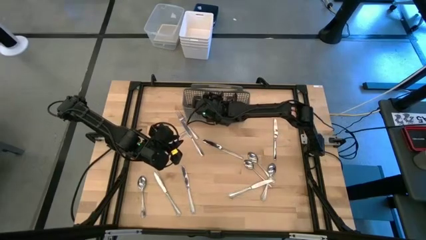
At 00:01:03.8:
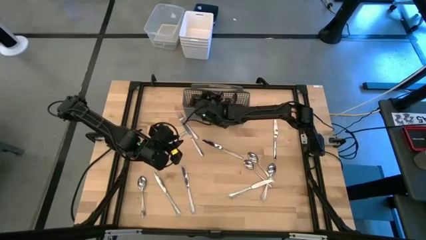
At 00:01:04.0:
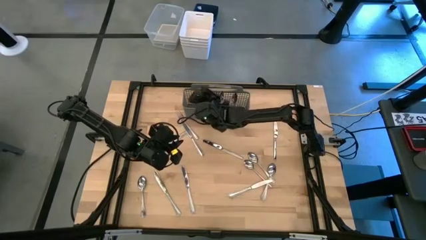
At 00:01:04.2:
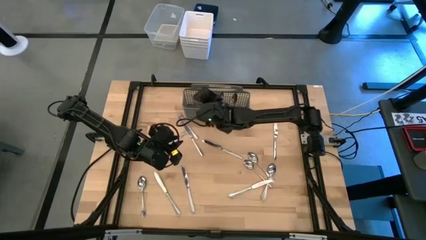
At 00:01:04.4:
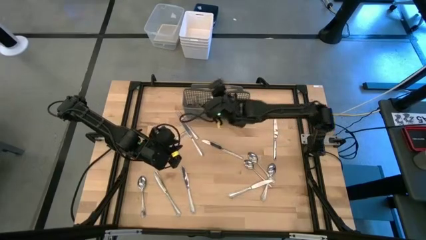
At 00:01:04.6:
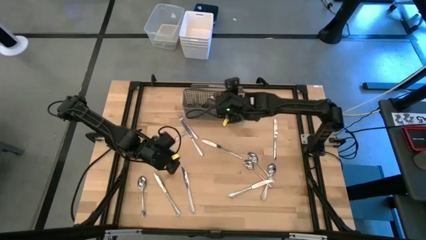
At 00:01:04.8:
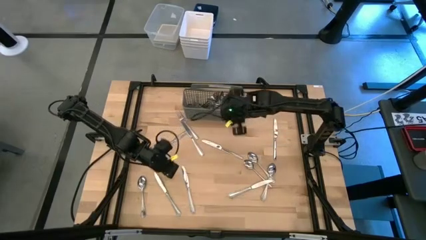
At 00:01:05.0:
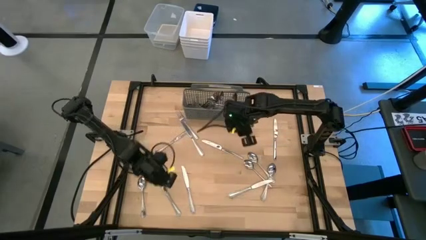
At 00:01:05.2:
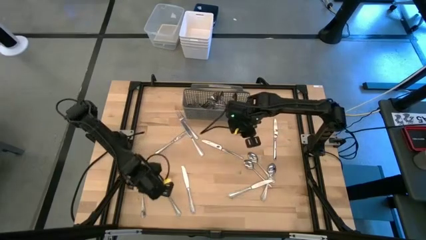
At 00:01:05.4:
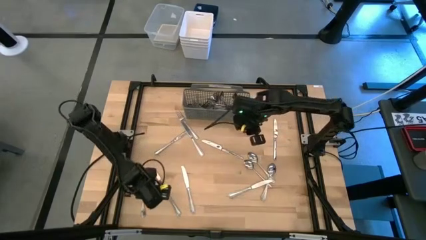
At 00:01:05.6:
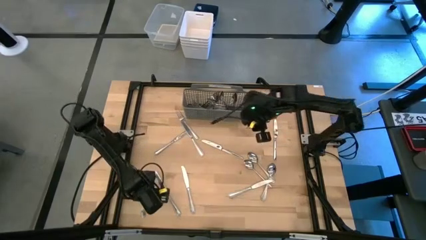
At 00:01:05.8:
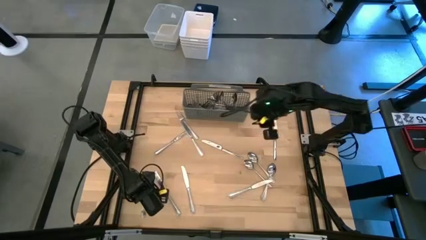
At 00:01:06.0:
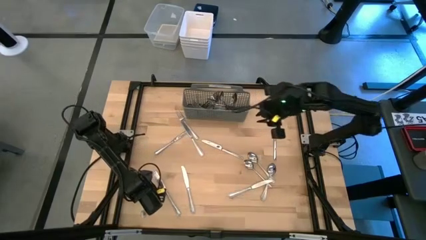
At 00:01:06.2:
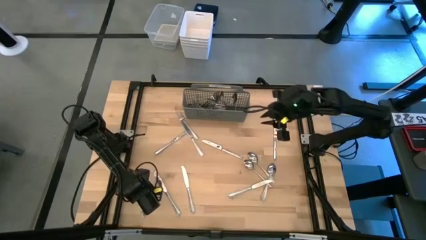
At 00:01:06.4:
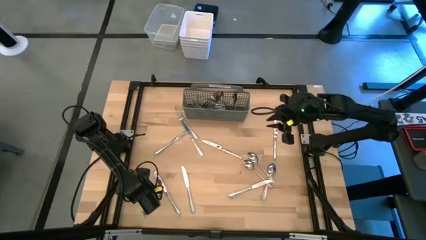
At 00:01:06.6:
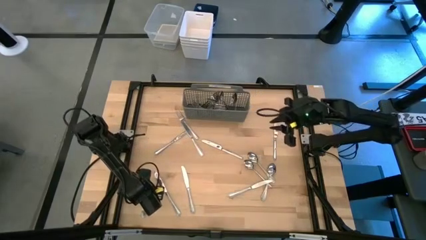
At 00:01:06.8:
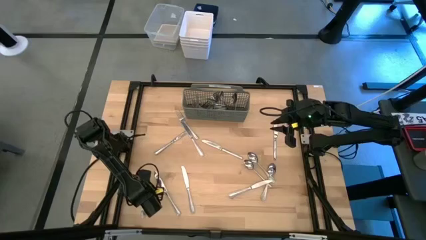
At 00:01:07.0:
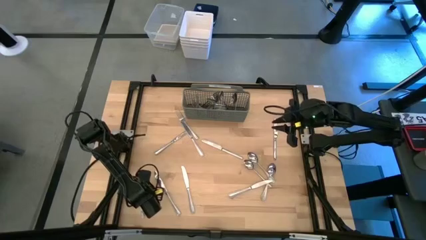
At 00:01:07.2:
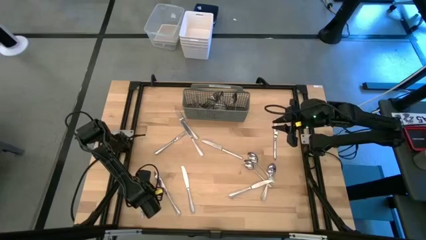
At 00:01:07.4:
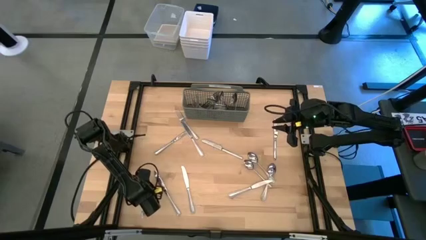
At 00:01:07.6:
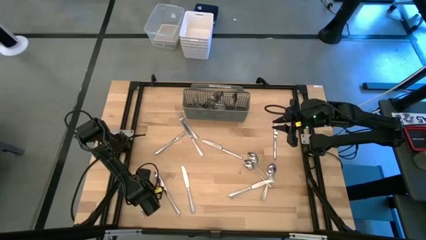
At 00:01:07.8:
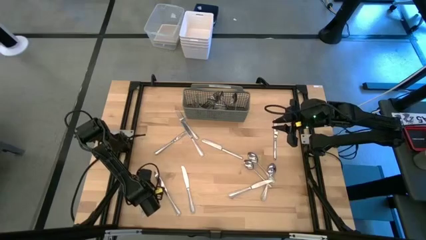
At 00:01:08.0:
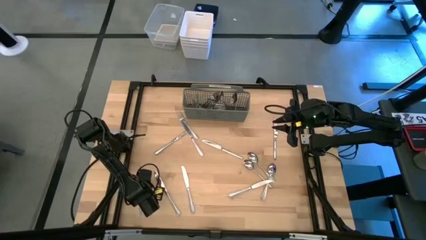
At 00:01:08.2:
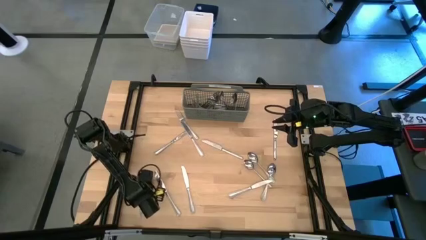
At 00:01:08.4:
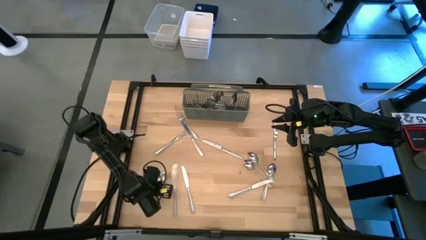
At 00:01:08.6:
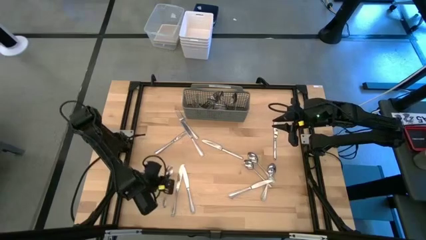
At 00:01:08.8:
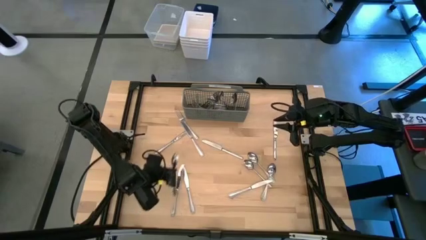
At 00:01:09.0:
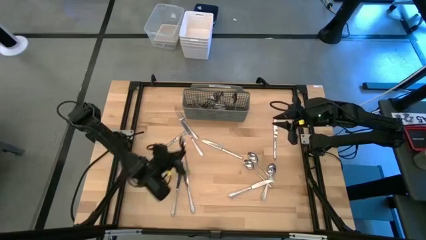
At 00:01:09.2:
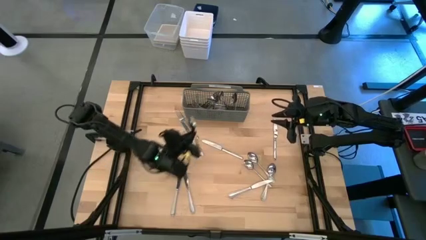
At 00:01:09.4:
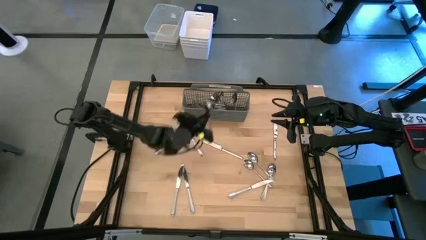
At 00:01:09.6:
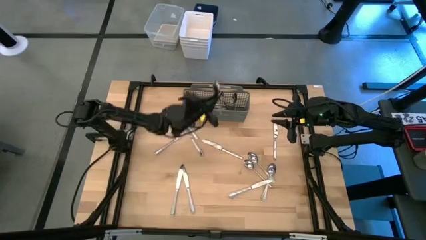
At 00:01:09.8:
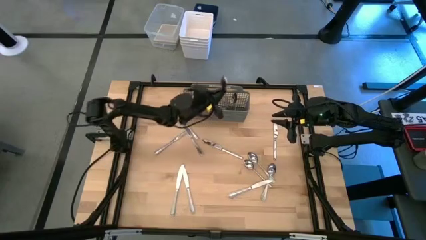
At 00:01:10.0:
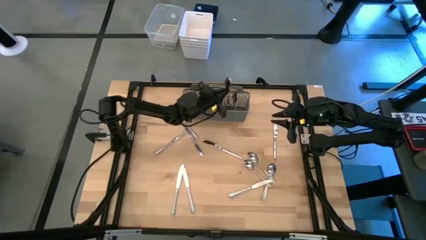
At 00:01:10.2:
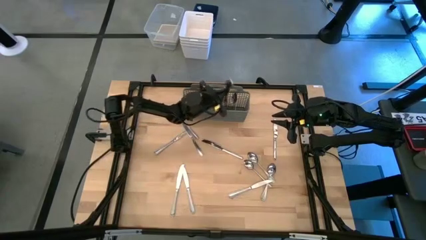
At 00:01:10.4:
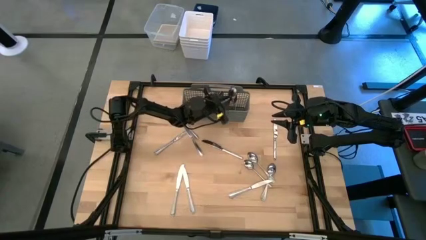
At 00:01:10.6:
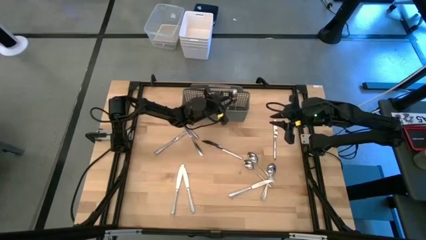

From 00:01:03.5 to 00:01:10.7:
Task: Sort silverware
Put the silver spoon into the gray silverware organizer

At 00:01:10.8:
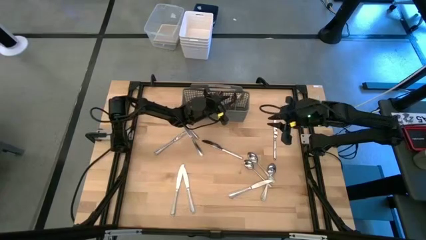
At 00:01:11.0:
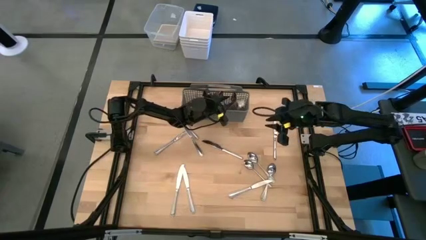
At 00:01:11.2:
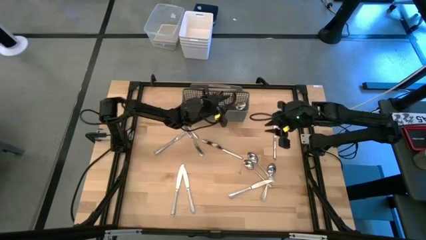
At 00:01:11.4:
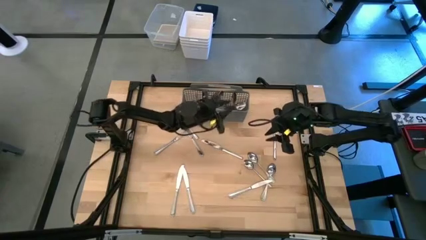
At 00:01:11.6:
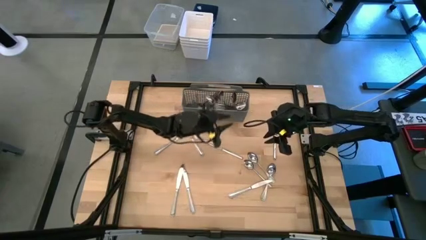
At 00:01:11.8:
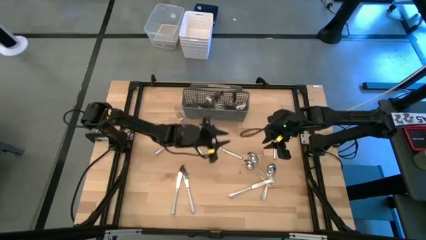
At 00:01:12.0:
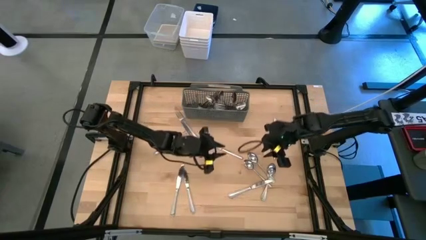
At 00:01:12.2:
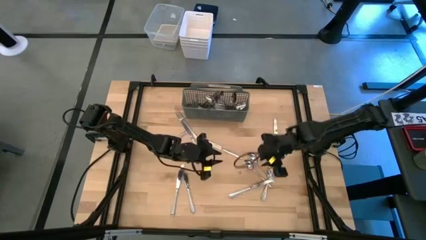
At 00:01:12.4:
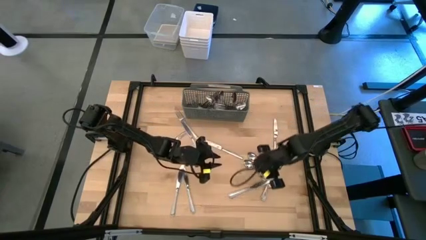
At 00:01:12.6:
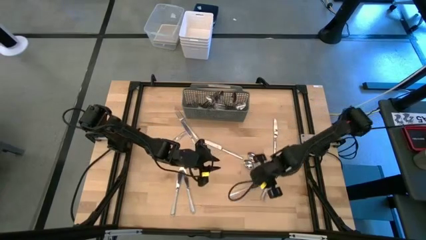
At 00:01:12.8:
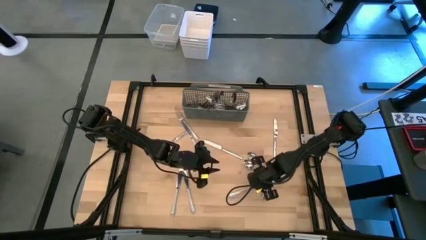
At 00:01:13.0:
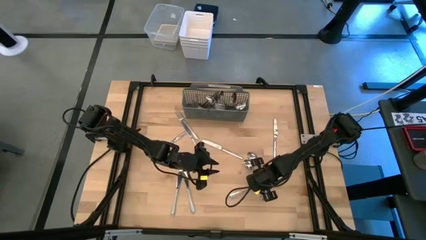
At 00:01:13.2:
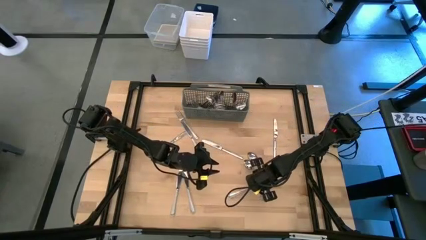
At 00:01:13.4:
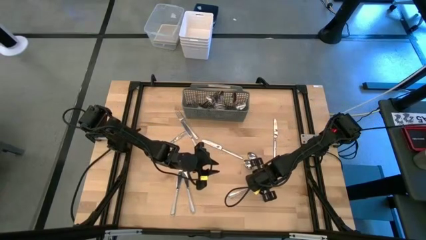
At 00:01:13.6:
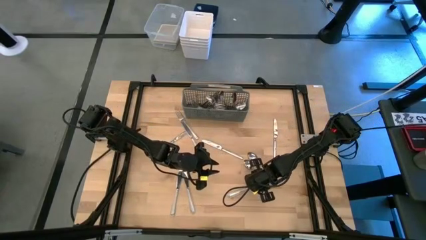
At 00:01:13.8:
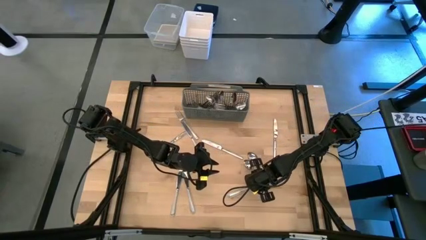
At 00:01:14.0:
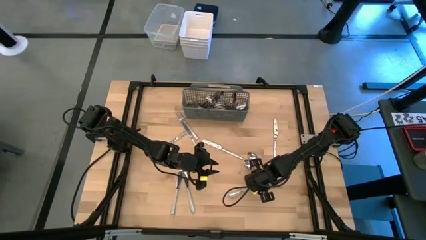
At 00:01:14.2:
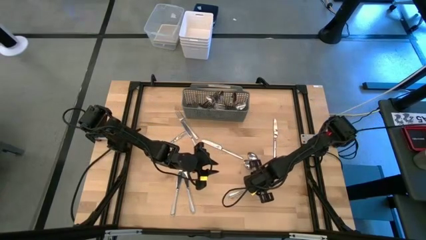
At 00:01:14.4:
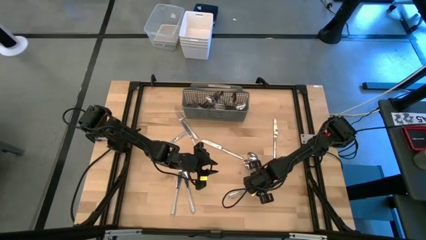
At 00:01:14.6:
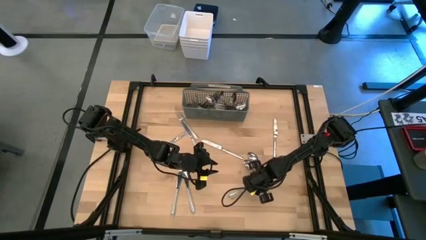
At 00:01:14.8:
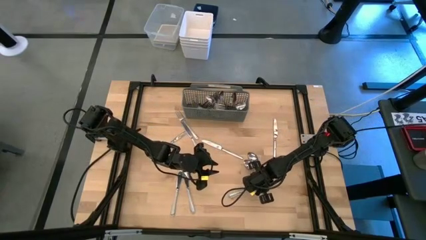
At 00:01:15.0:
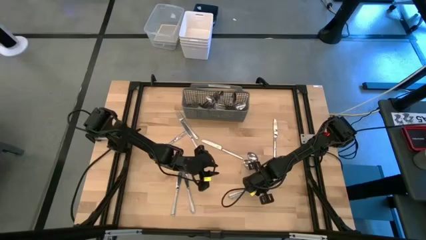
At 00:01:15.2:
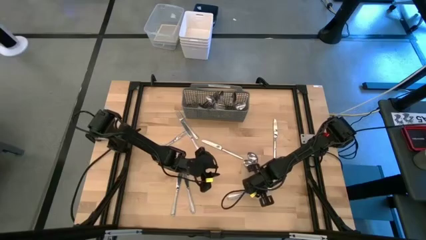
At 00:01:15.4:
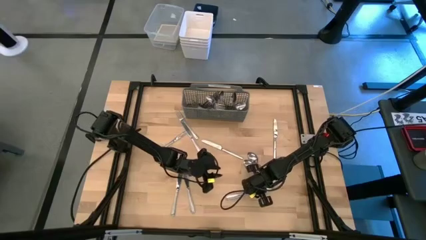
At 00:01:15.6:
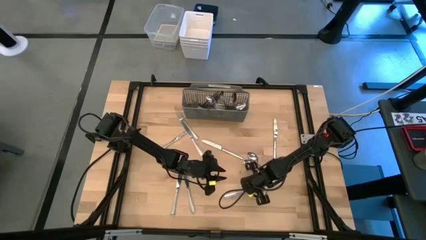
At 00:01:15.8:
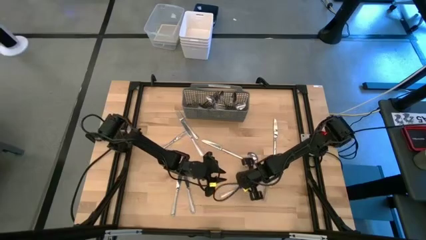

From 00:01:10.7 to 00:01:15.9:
Put the silver table knife into the gray silverware organizer

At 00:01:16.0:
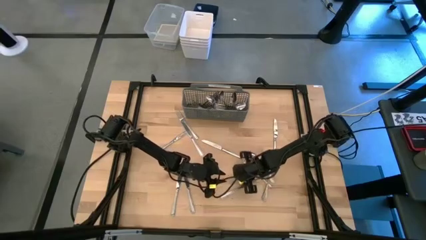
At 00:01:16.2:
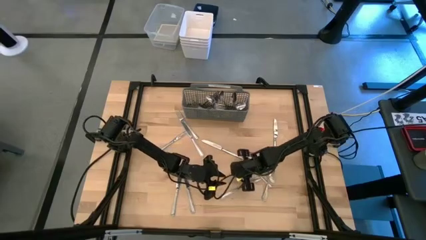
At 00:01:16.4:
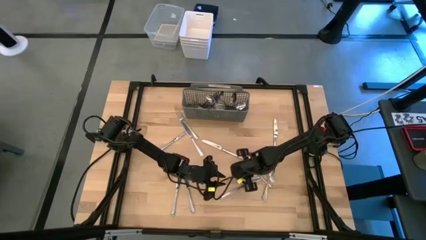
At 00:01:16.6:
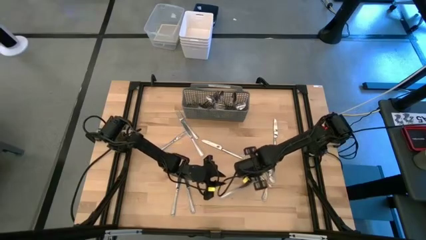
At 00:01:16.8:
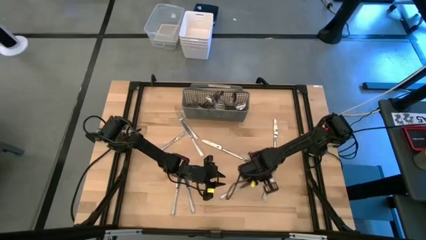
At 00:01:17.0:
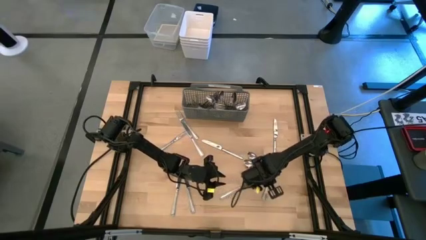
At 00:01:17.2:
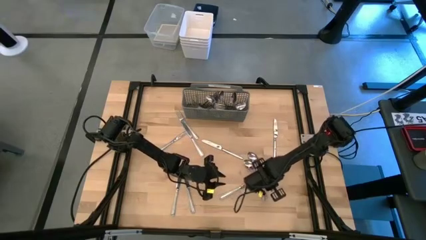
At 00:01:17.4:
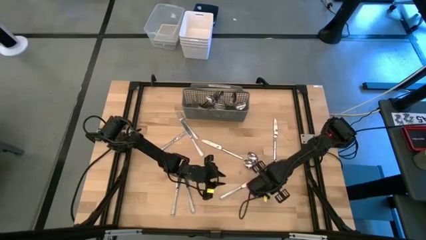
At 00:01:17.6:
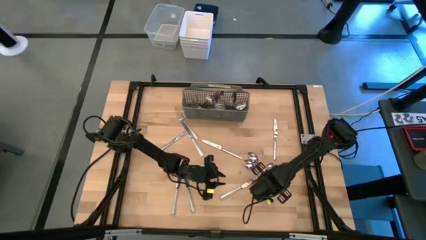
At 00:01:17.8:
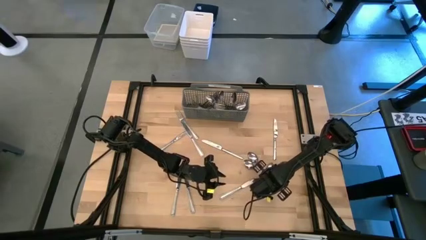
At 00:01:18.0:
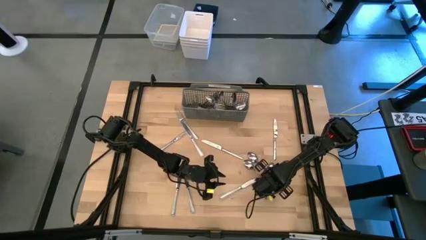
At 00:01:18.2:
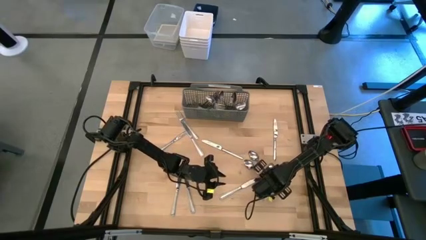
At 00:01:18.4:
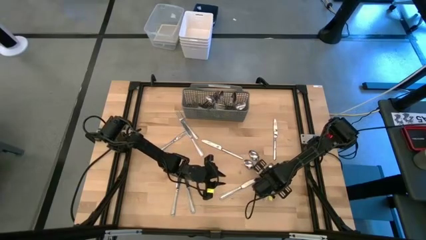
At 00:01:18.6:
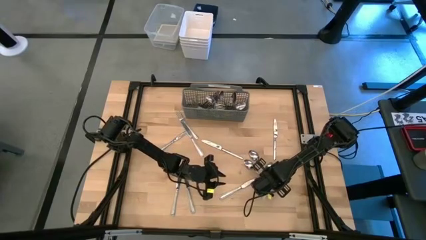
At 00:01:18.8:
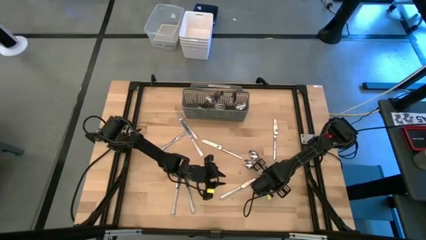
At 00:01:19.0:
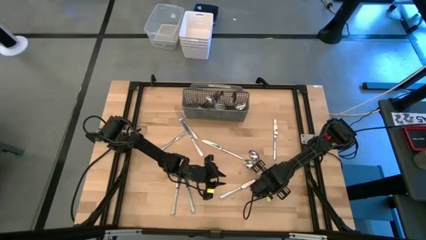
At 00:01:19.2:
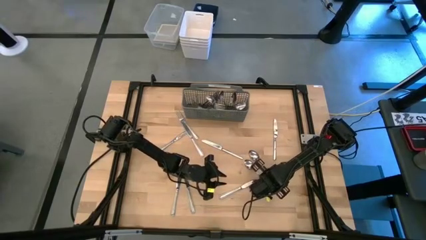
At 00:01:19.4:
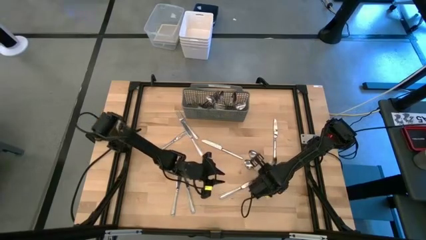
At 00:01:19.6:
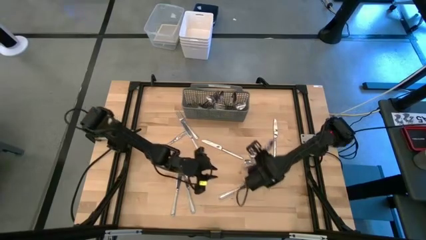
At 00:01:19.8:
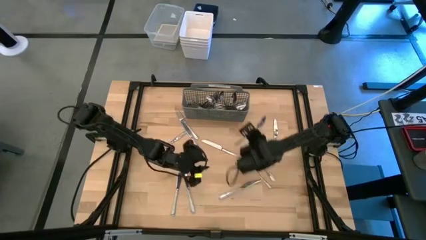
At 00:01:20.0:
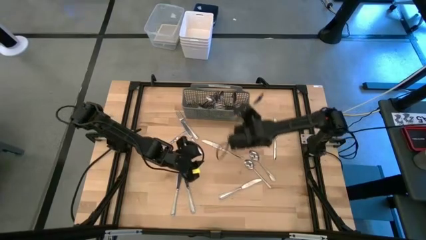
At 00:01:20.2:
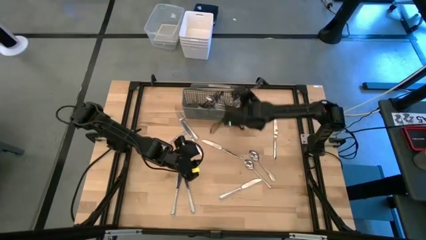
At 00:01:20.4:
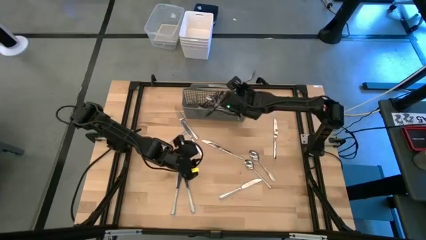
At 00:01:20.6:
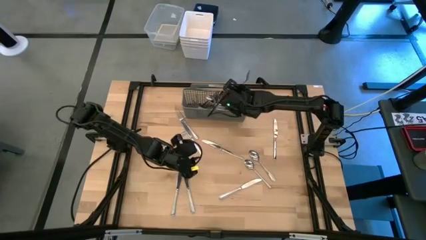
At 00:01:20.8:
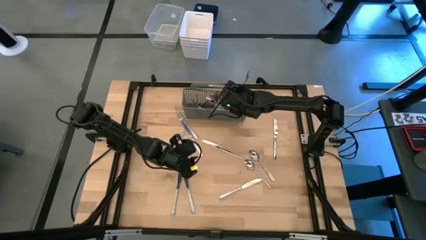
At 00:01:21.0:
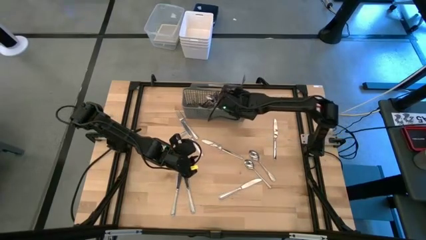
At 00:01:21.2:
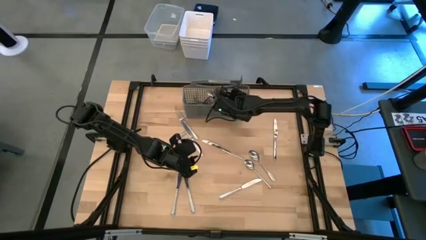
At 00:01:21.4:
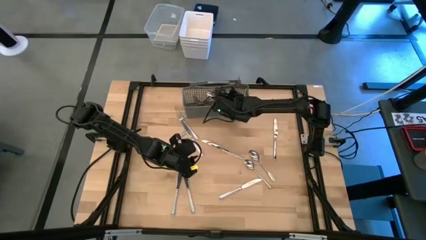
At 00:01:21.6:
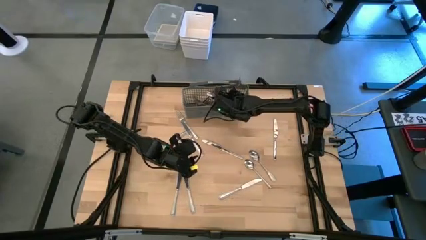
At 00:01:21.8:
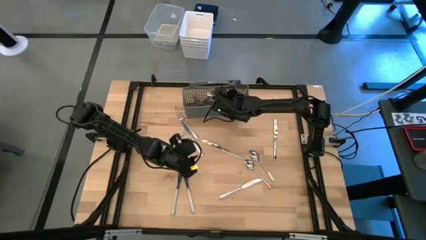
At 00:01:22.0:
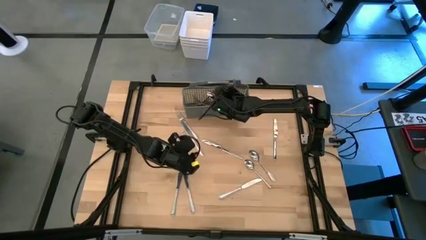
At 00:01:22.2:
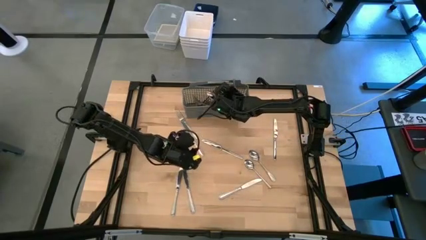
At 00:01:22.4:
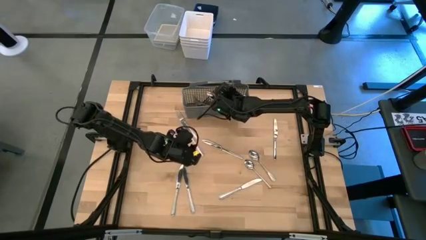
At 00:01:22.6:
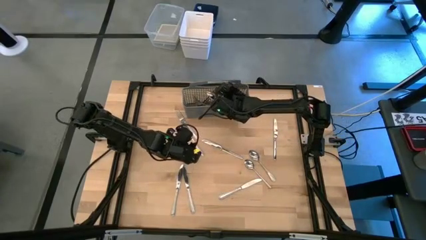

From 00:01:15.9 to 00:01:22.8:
Put the silver spoon into the gray silverware organizer
